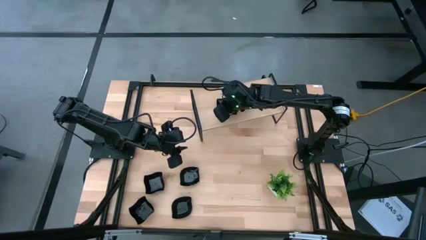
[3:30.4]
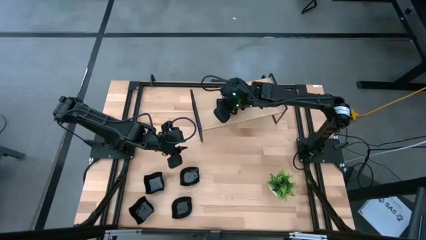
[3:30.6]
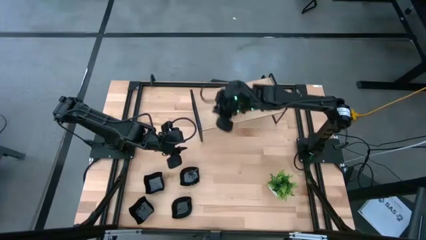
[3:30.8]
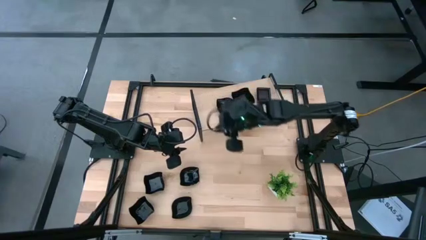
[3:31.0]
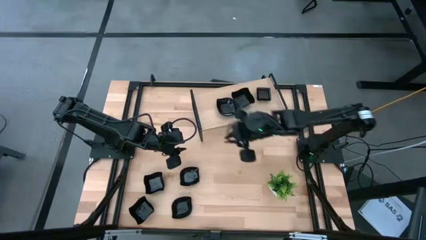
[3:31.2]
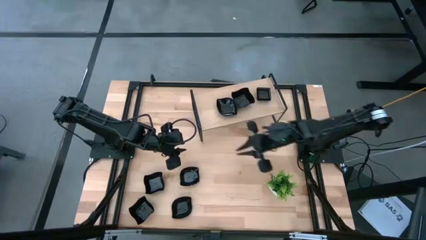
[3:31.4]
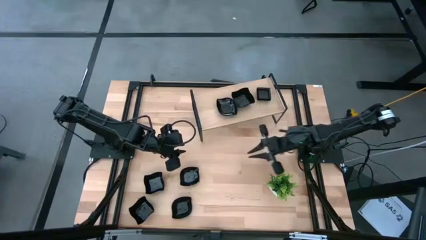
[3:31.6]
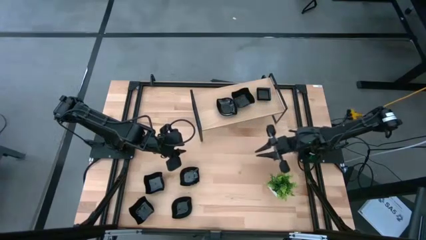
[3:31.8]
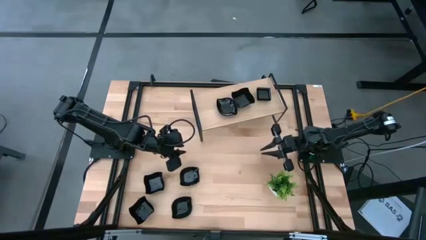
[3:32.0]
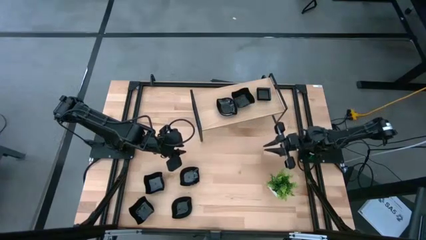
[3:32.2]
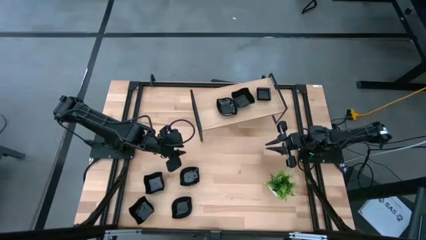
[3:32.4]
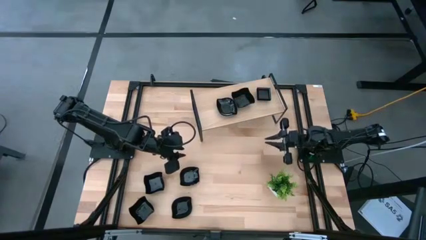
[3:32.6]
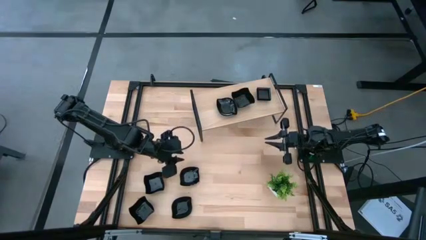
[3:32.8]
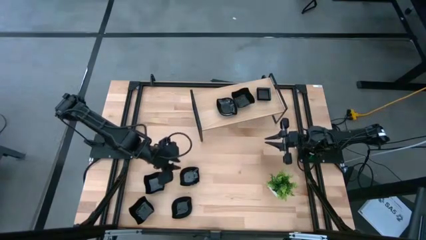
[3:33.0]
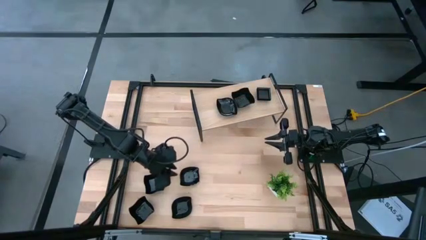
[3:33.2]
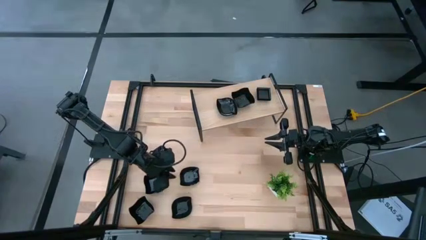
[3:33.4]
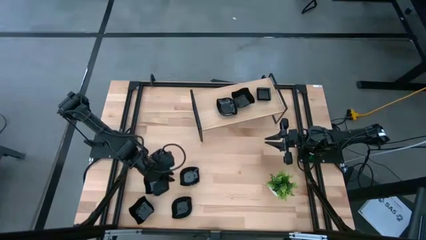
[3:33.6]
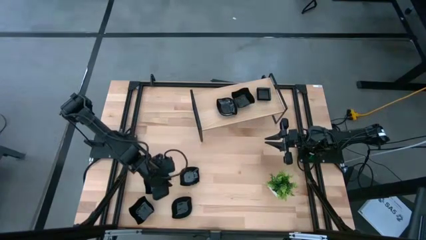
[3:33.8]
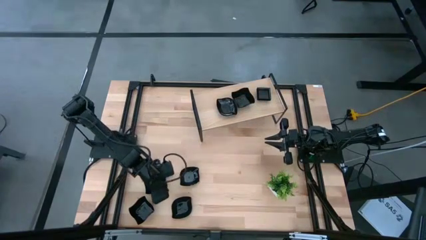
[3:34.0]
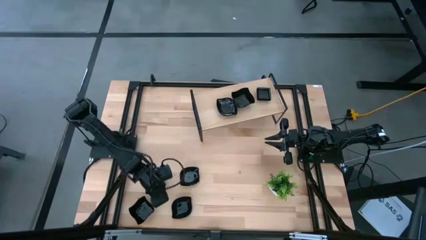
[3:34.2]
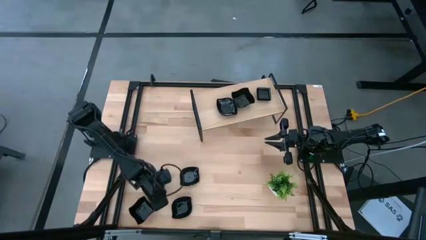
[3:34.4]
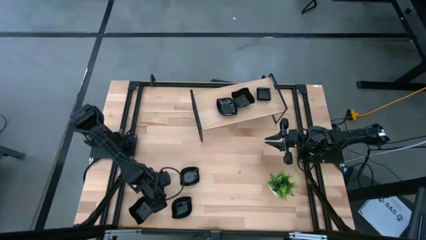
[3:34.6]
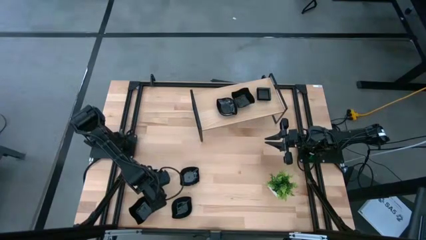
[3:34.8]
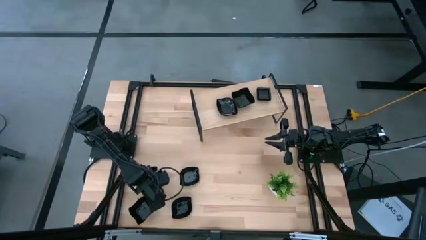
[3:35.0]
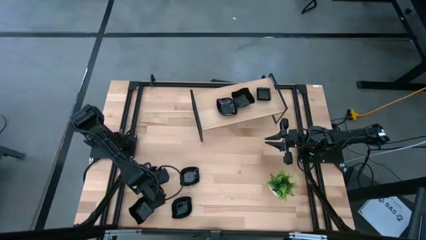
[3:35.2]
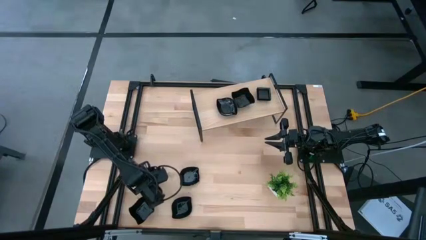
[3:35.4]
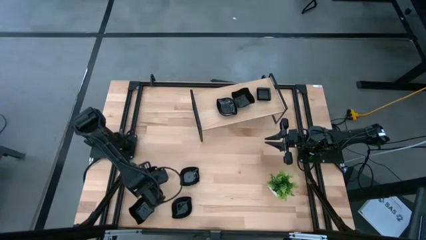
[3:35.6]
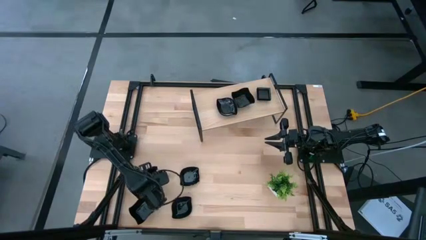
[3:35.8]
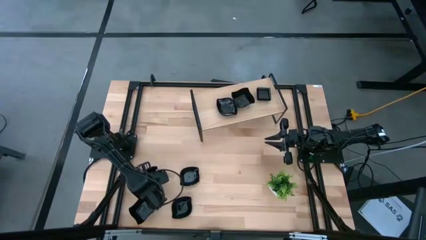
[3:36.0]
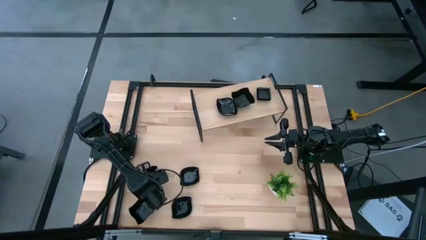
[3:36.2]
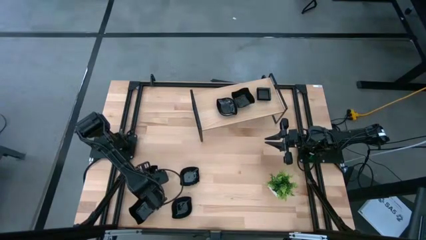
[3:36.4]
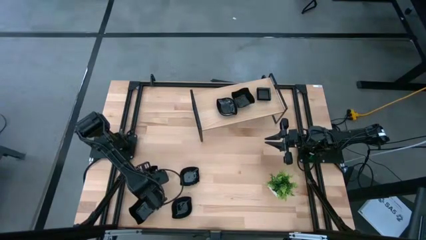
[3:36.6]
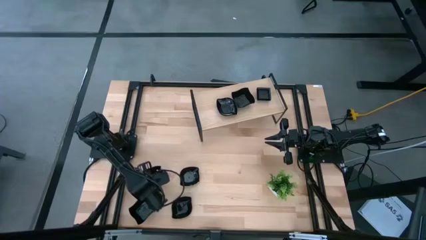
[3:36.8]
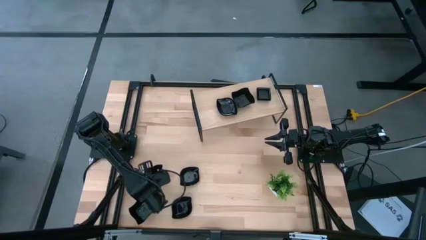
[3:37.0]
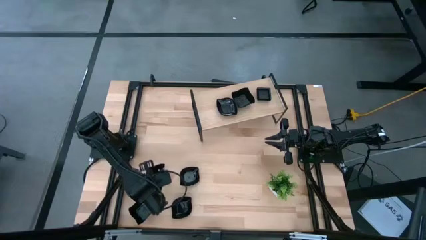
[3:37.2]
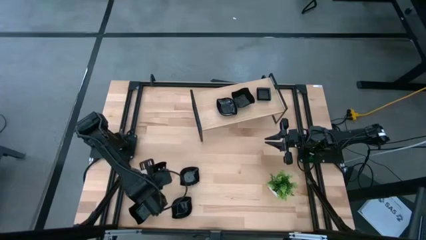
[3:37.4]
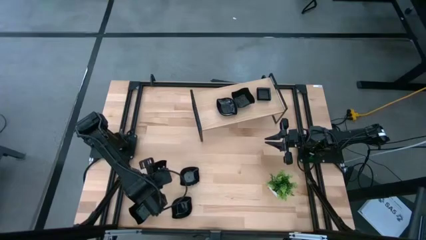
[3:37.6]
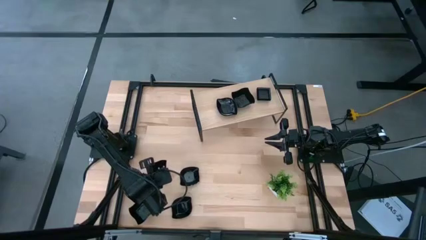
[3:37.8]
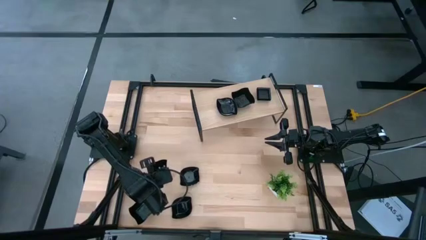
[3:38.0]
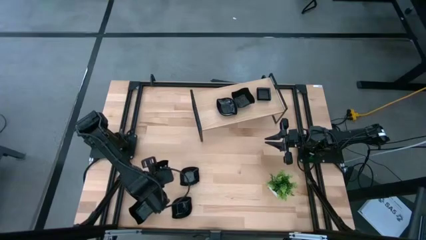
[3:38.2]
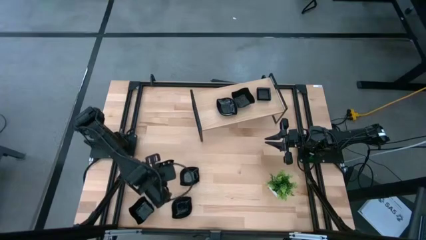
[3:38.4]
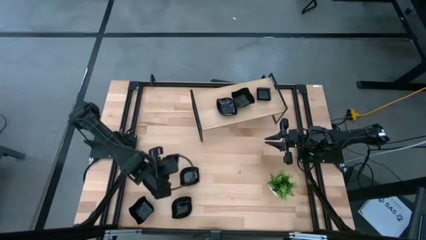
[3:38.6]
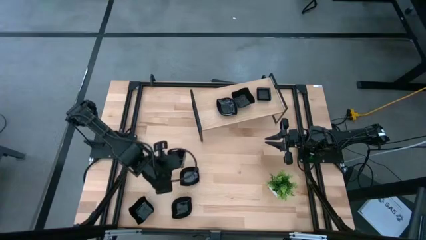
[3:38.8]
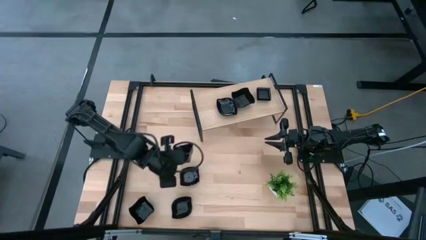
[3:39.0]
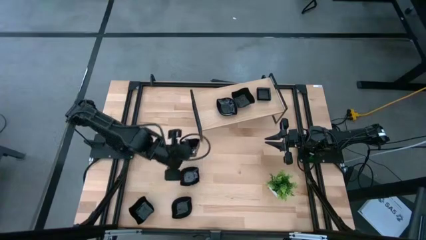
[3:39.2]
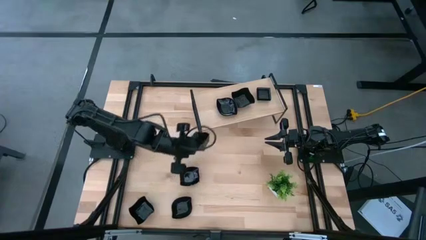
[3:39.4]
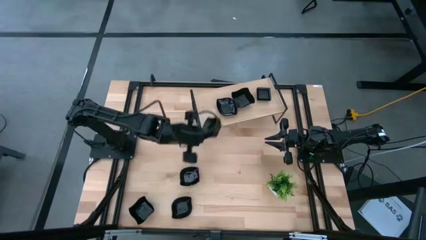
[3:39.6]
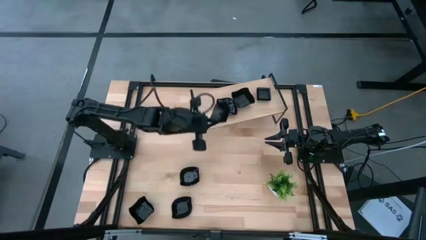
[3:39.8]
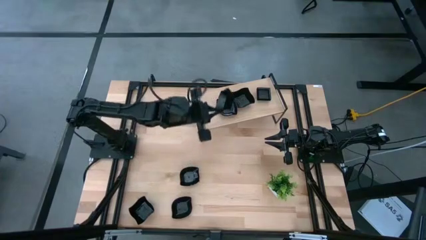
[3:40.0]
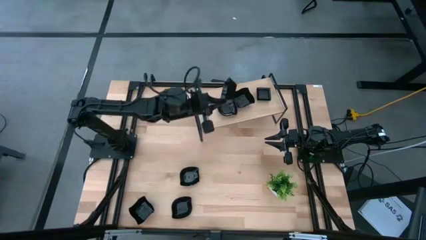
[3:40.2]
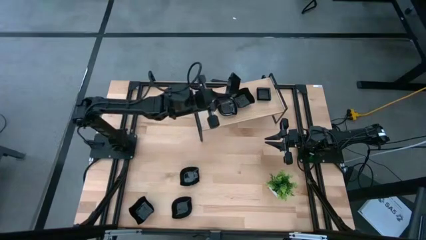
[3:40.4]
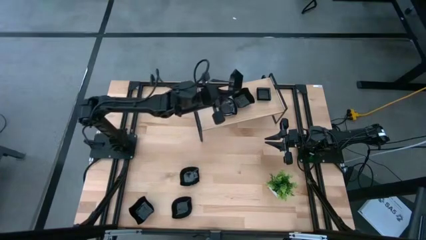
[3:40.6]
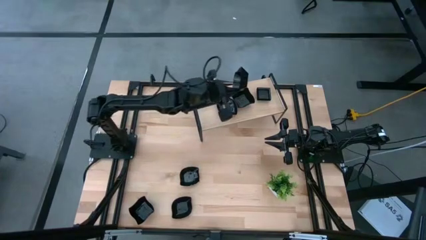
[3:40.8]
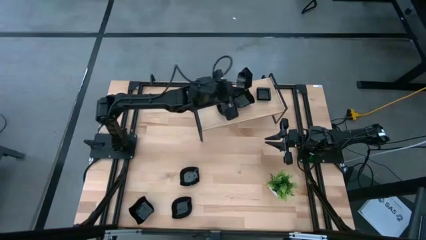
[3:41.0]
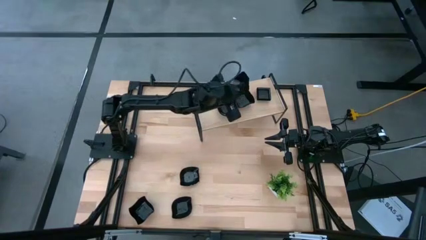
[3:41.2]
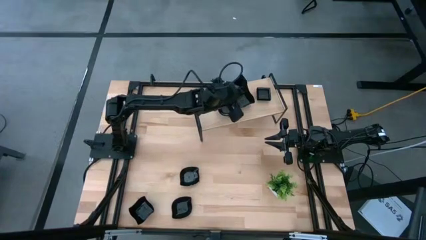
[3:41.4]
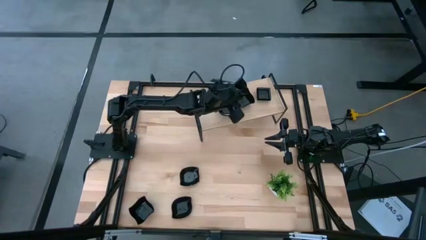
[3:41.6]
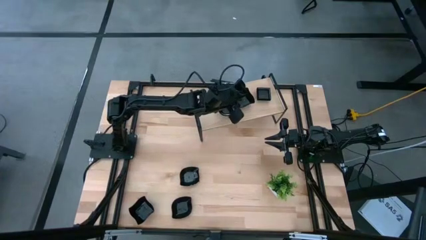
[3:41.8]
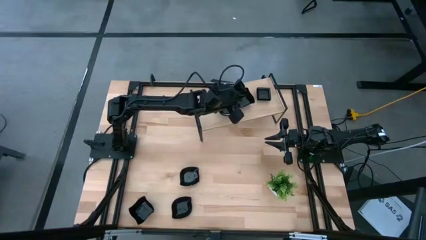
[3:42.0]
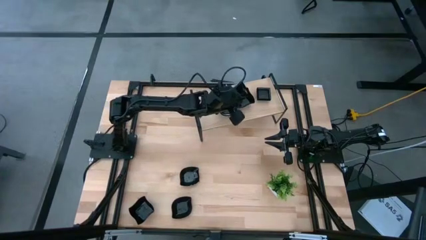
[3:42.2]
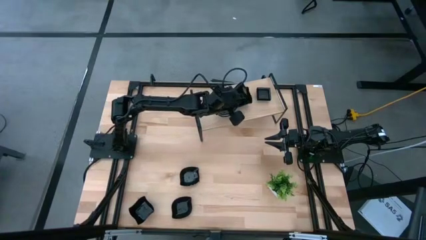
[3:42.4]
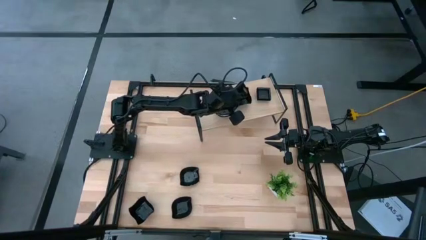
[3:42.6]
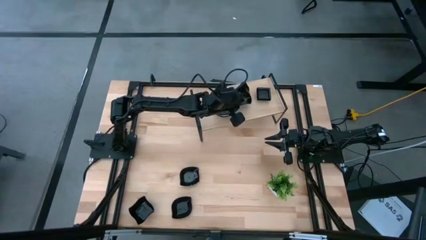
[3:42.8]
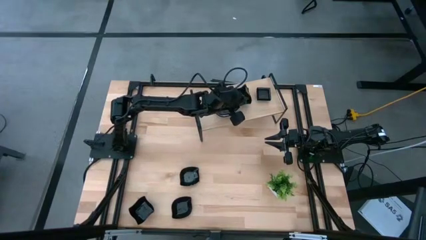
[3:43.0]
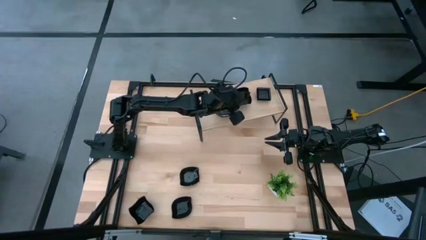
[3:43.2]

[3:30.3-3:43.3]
Task: Pick & Place Mini shaped plates
Stack the distorted square plate on top of the distorted square plate on the shelf

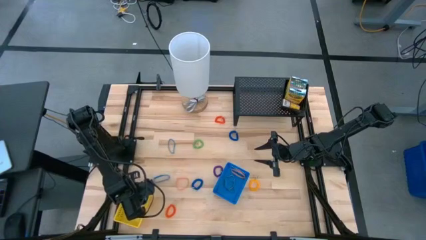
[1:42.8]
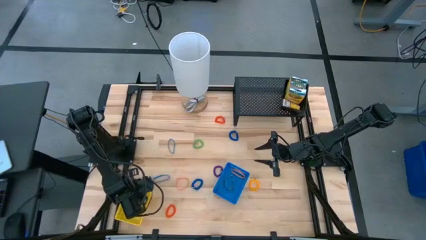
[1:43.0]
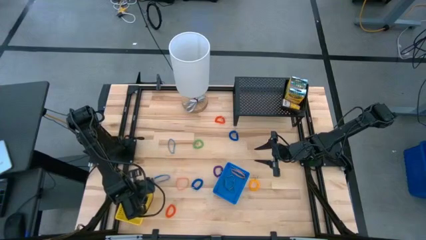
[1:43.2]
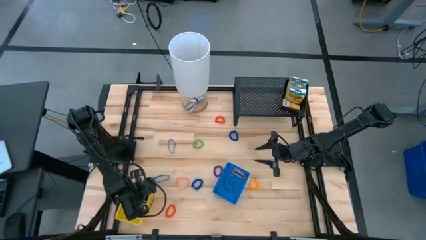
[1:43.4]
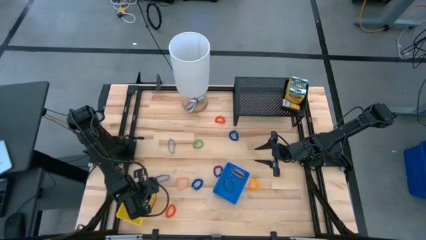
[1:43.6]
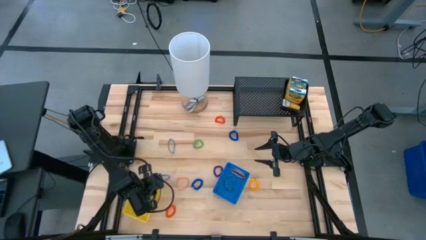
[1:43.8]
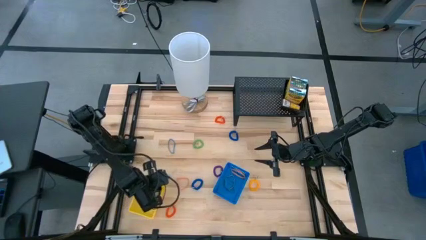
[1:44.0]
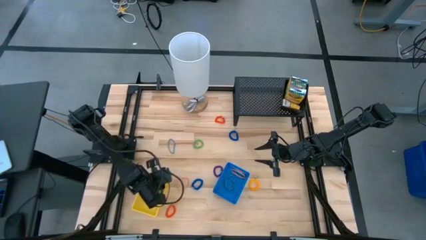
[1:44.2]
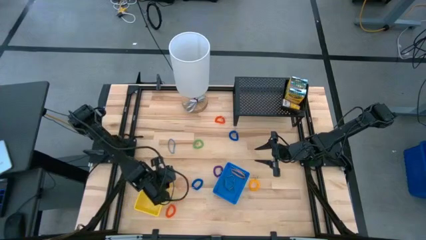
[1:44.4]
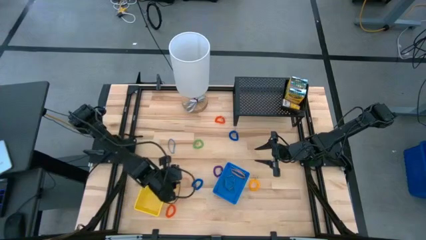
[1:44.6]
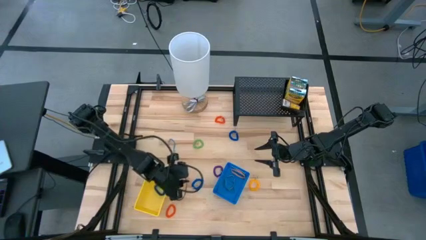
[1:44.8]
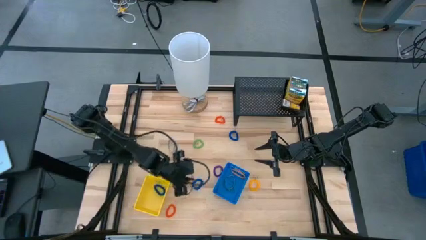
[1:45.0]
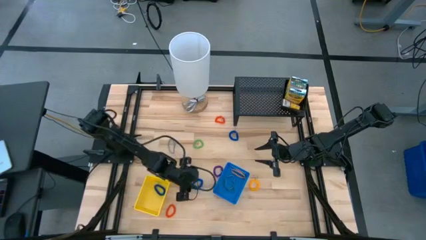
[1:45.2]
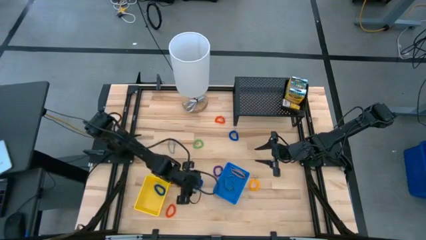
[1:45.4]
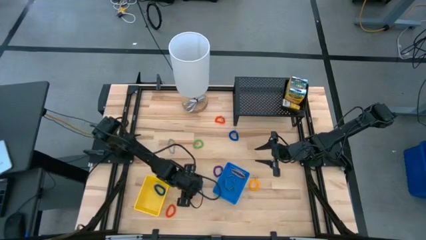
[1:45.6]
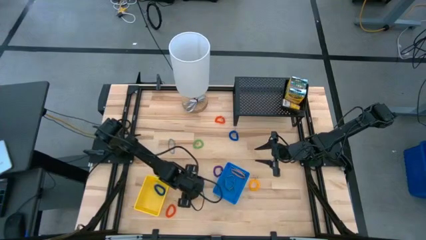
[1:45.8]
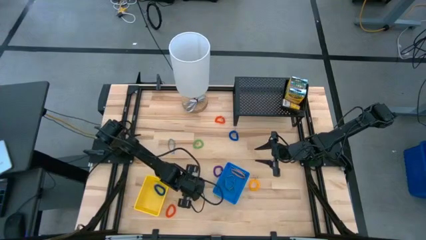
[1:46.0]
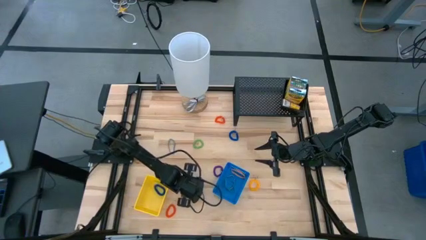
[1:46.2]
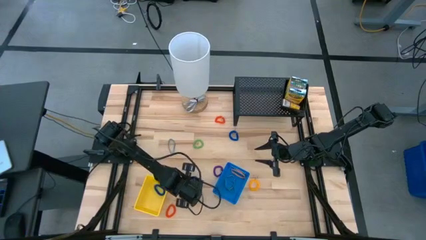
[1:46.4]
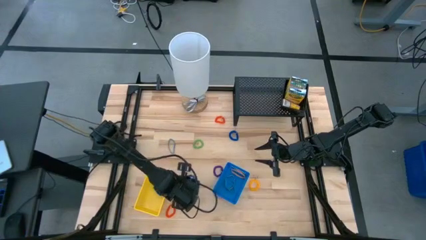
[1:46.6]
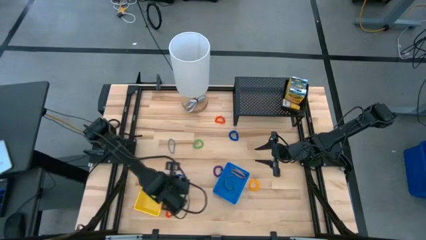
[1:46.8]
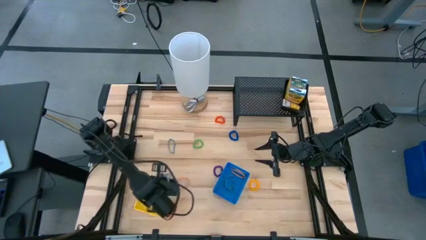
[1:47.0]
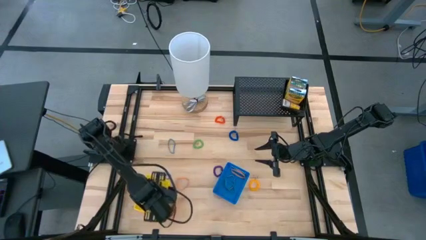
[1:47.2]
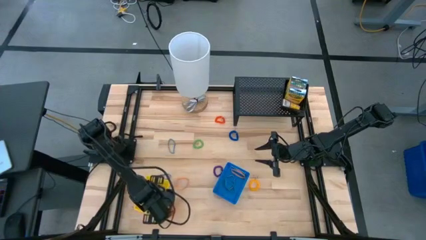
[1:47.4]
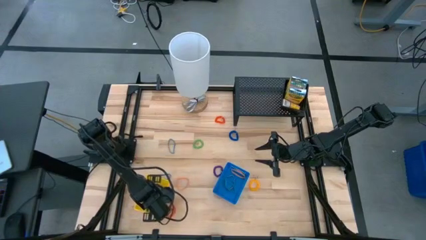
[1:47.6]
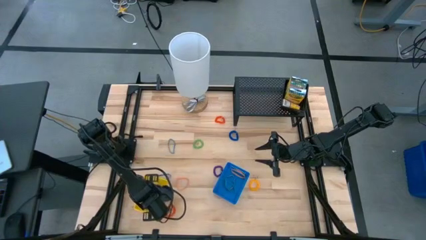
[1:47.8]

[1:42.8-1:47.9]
Task: Pick & Place Office Desk Supplies
Put the blue spring keychain into the yellow bin
